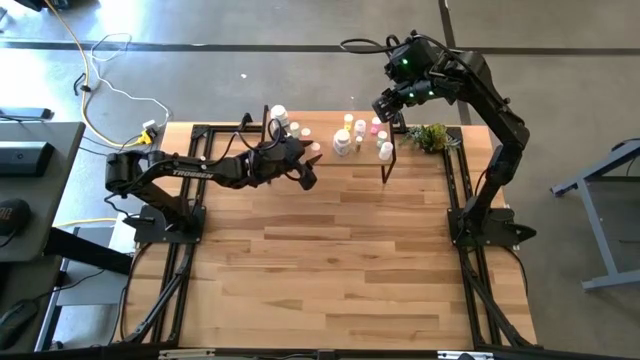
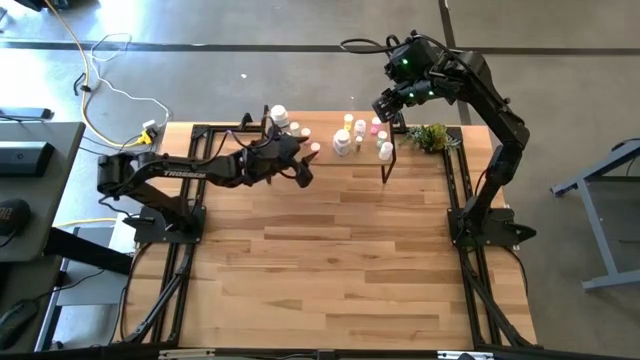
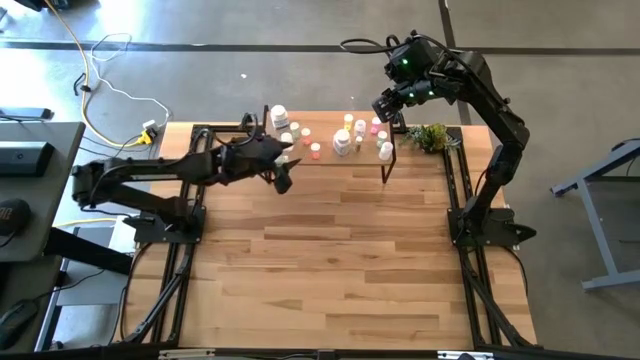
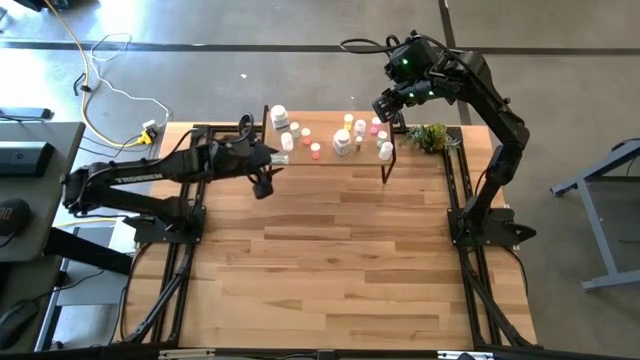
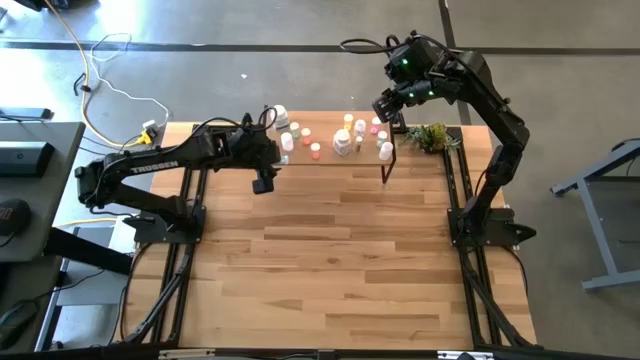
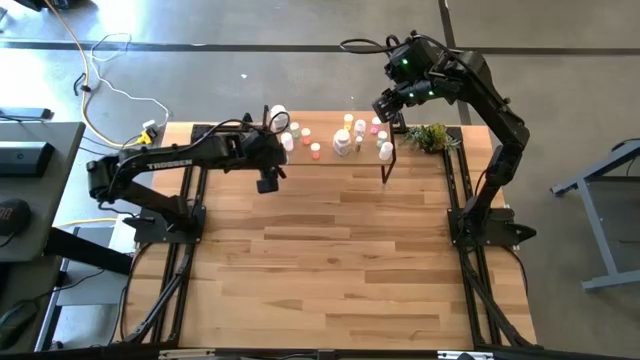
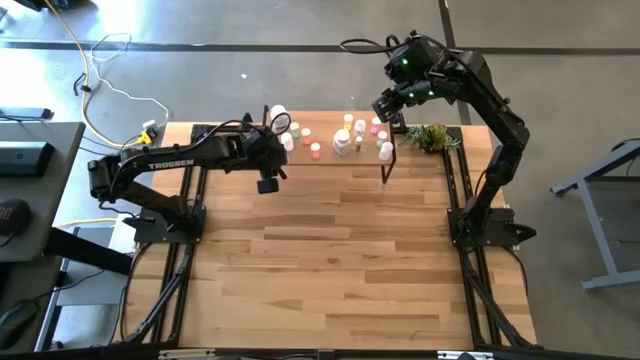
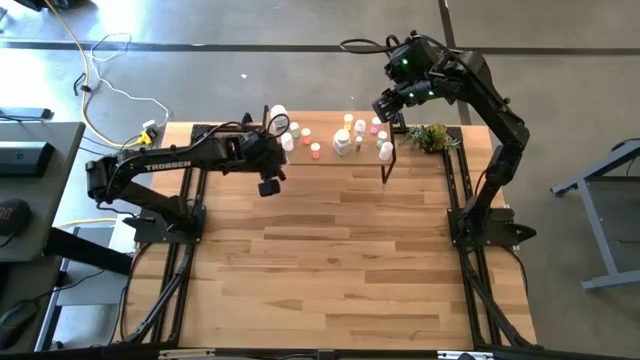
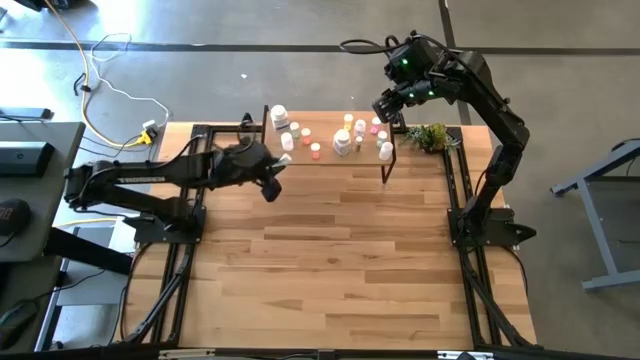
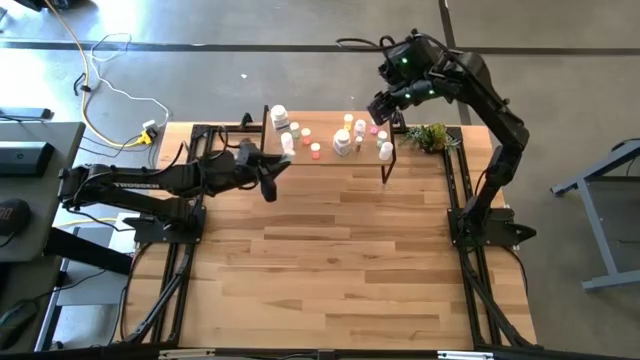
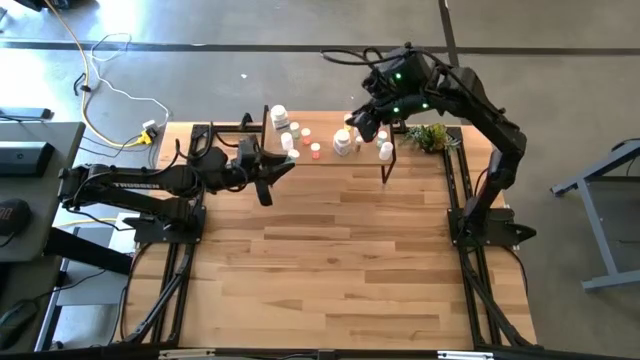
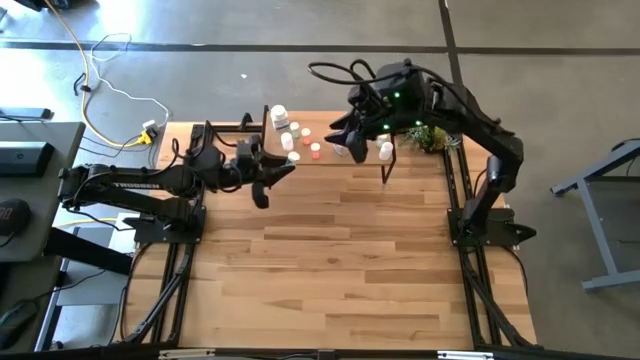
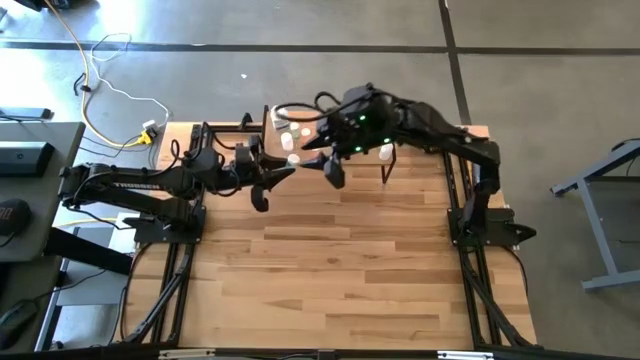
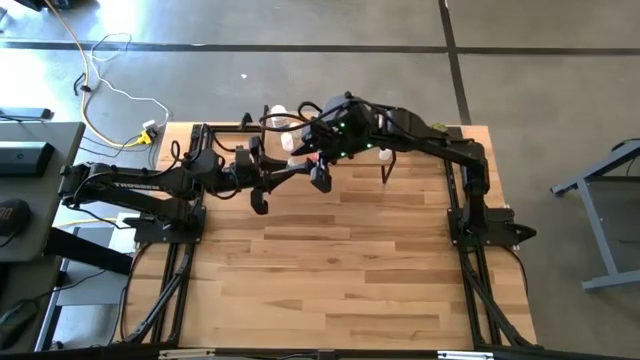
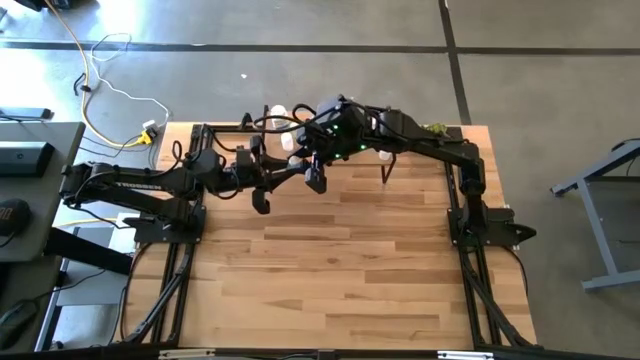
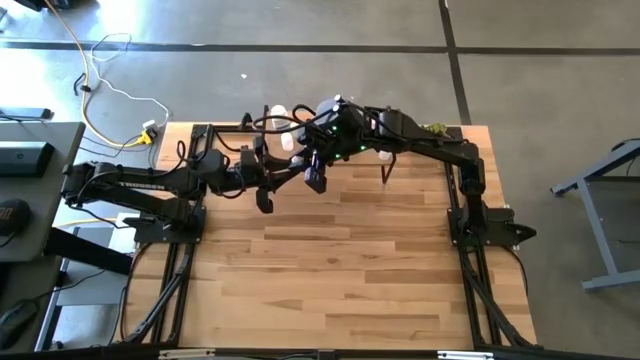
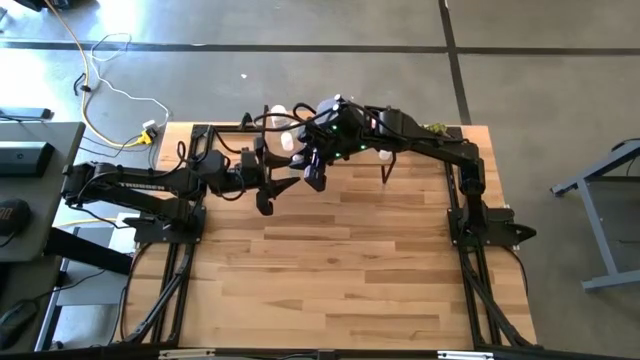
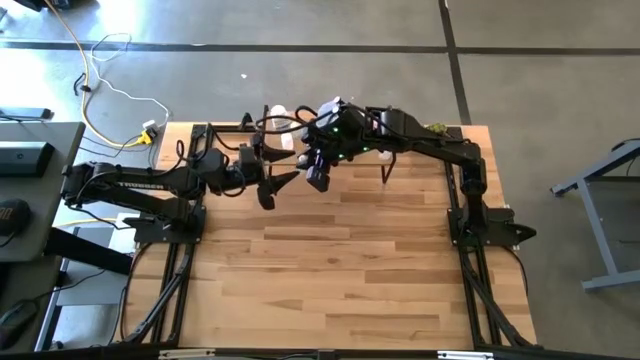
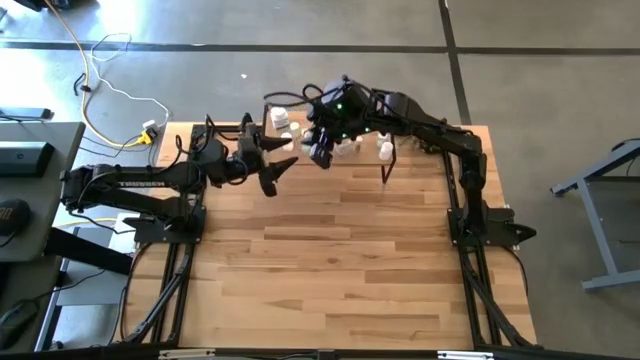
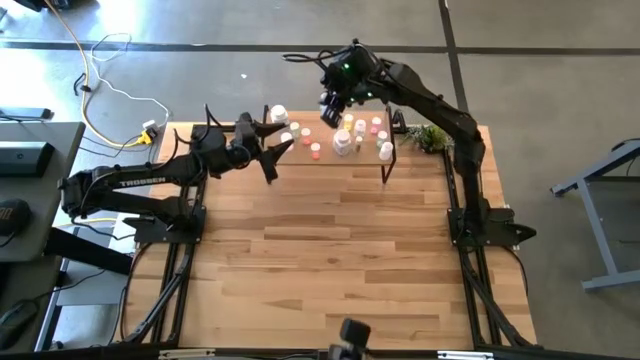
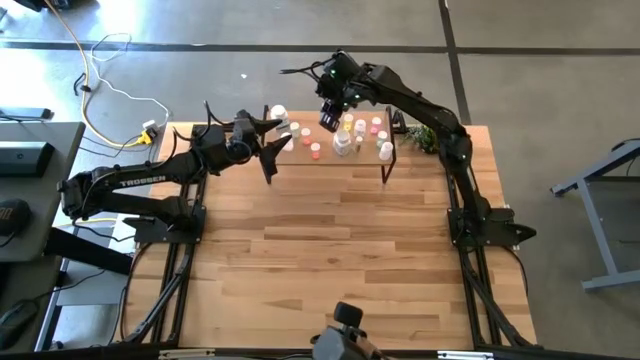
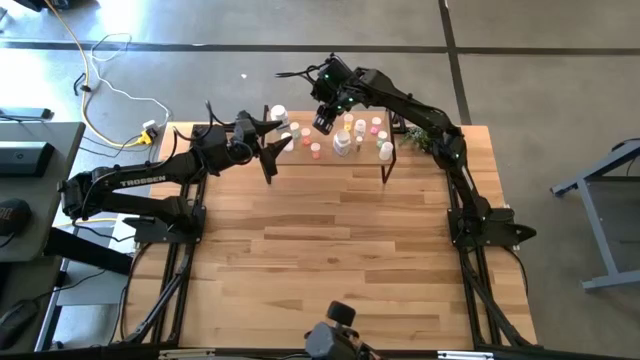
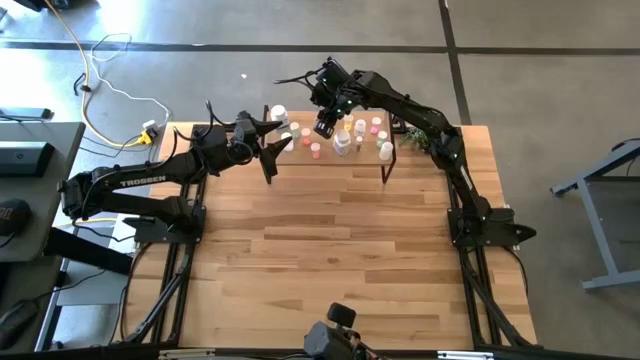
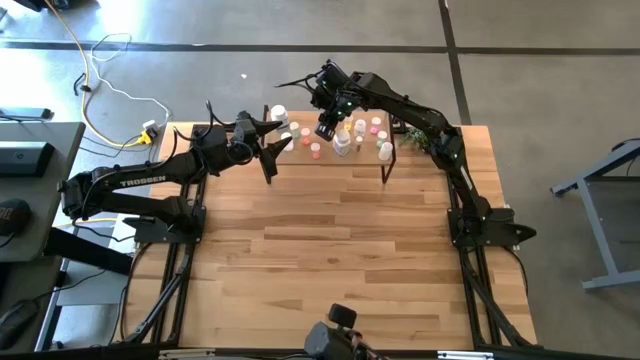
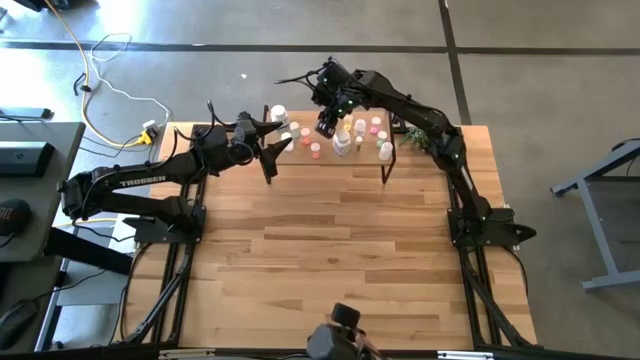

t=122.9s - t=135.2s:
Task: Pick and place medicine bottles onto shelf by color
Adjust the blue pill bottle on the shelf

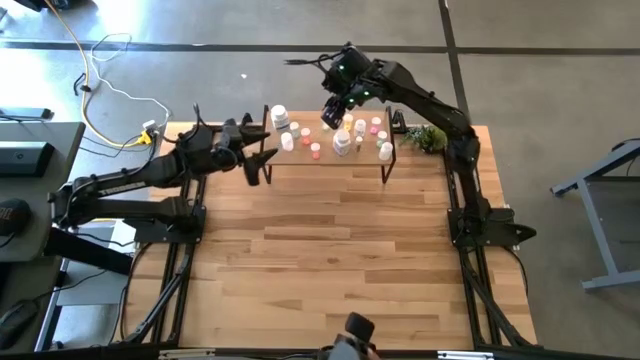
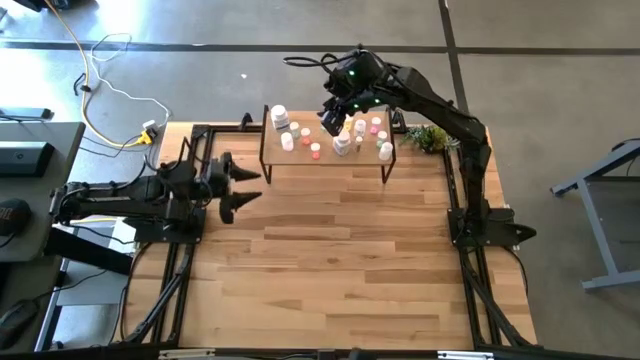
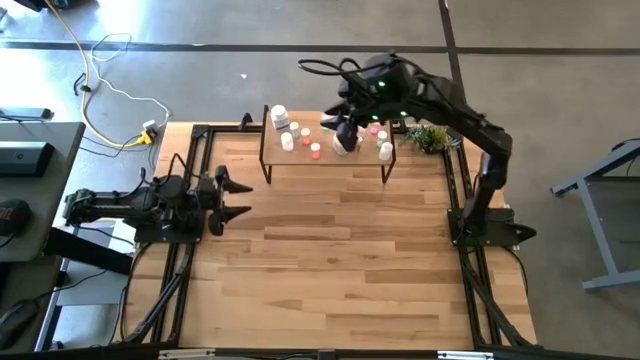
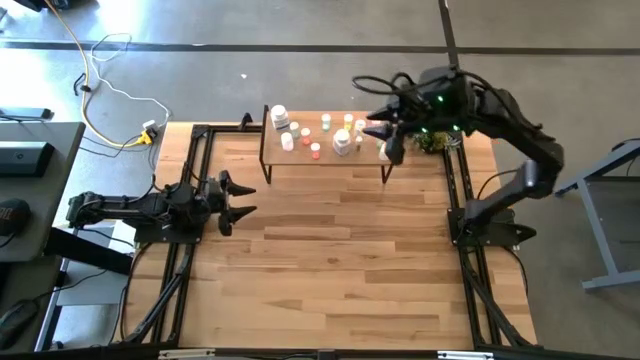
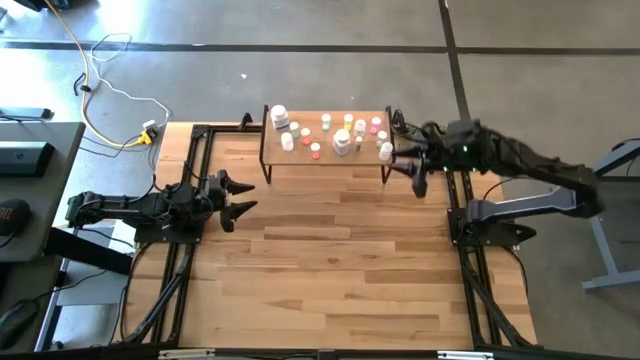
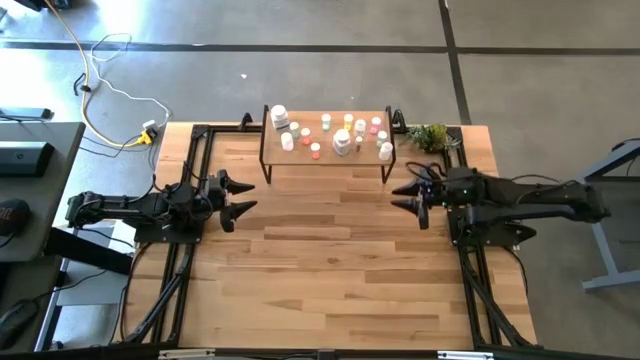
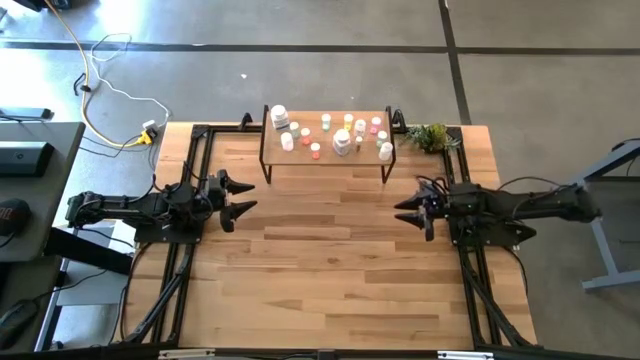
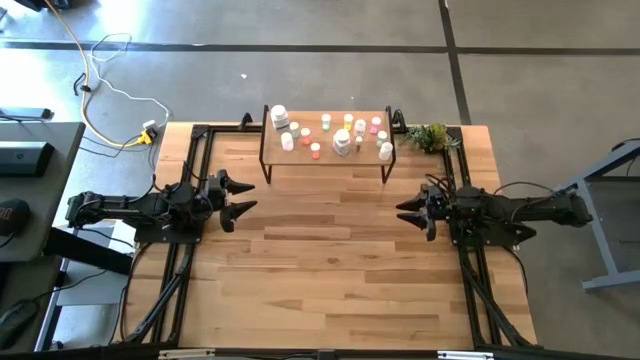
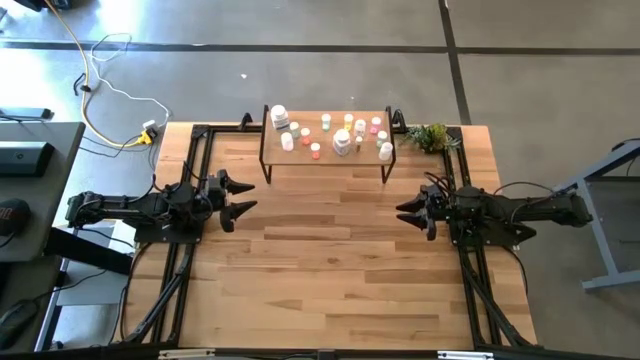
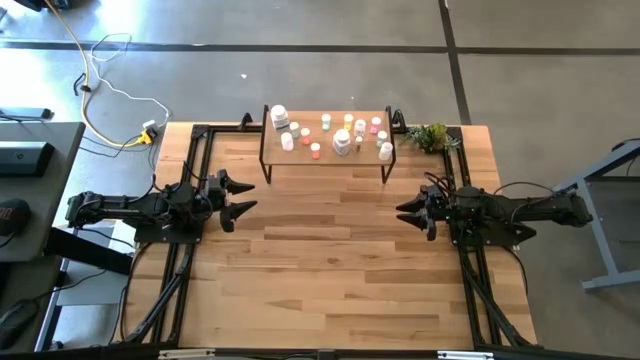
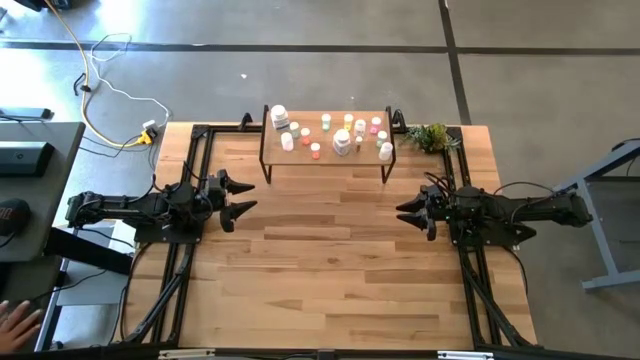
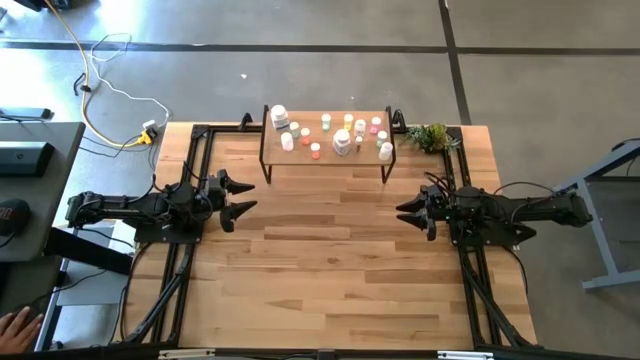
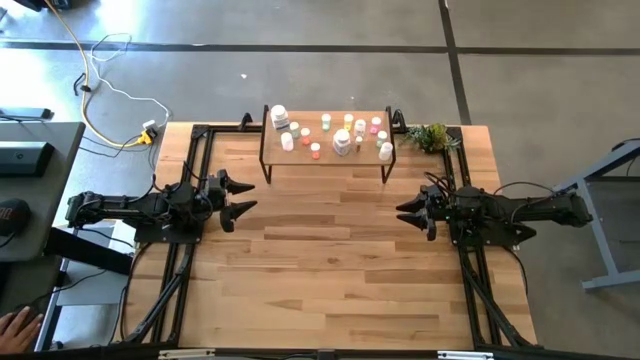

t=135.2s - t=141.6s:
Return to Home Position

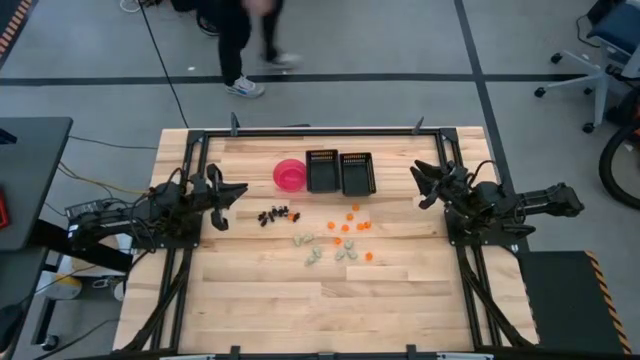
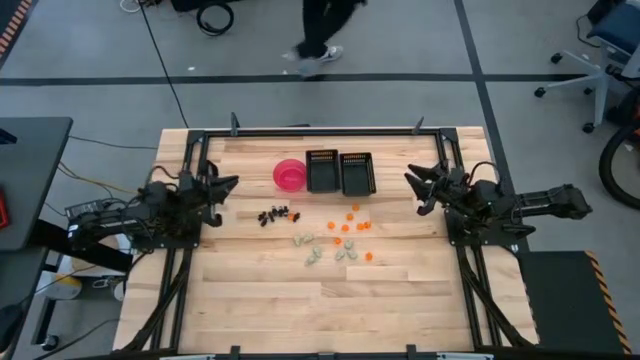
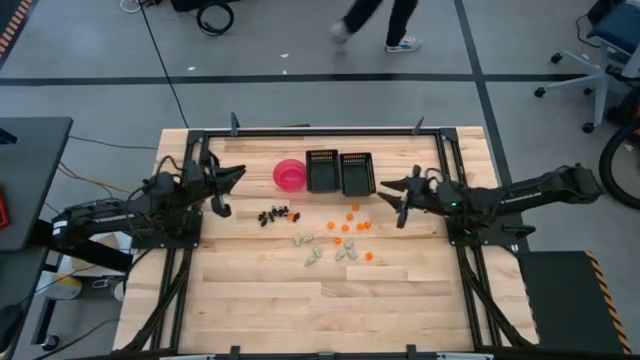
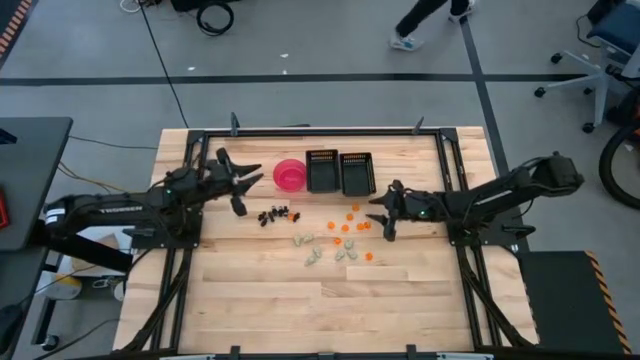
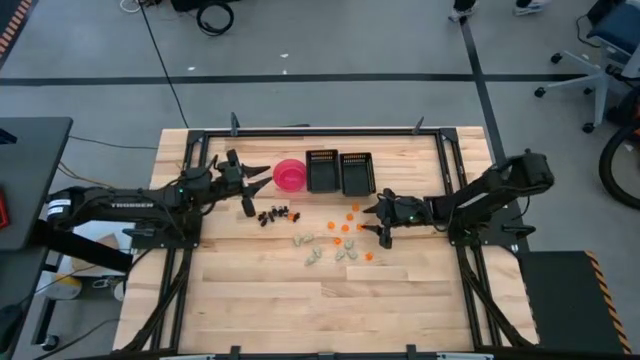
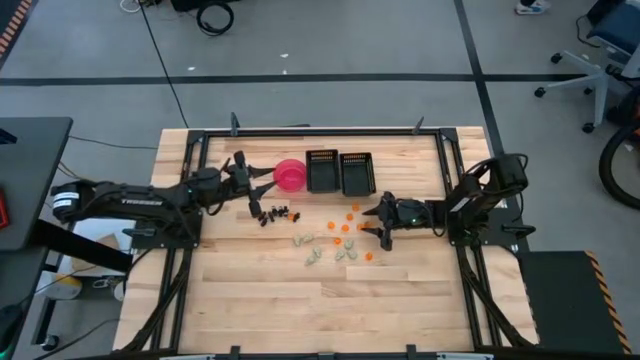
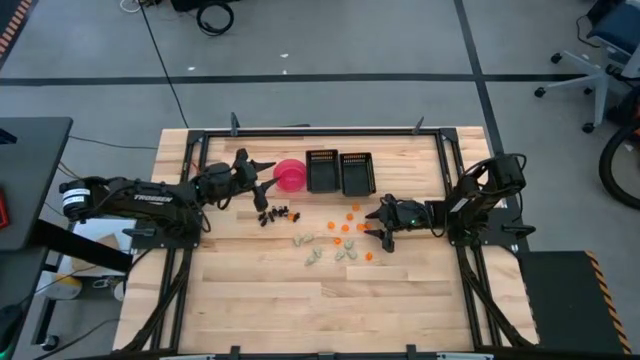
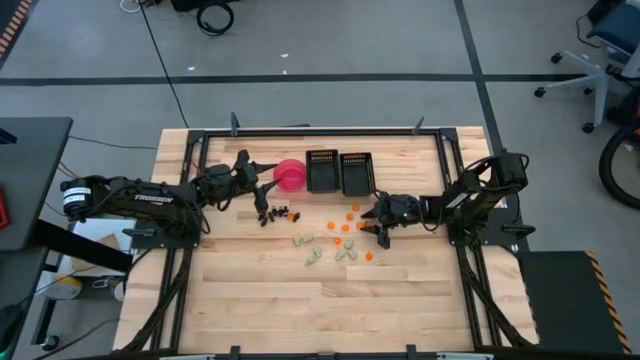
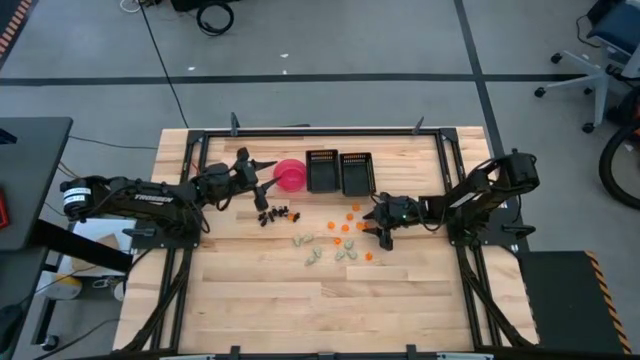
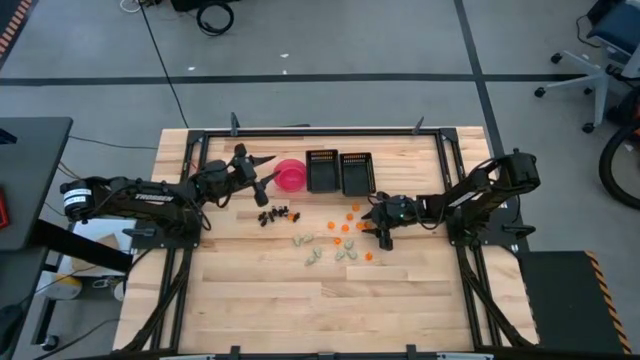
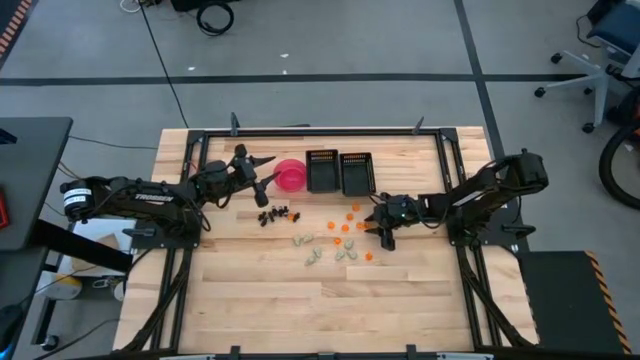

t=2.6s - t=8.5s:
Task: Sort Halloween decoration
Put the orange pumpkin toy into the right black bin
